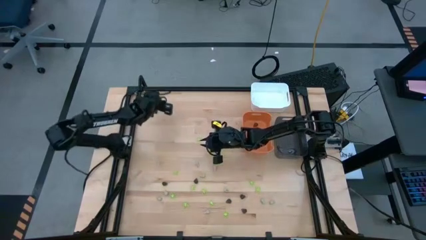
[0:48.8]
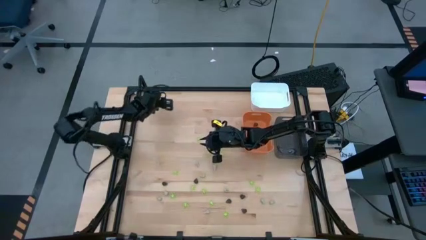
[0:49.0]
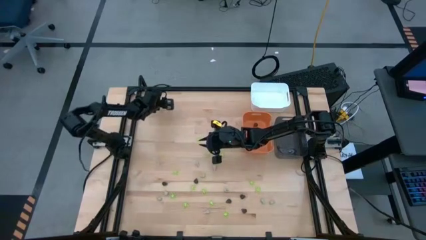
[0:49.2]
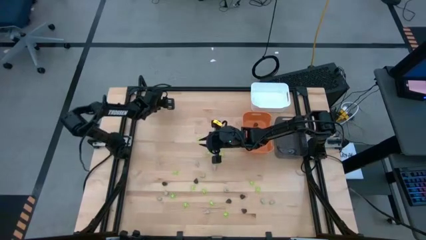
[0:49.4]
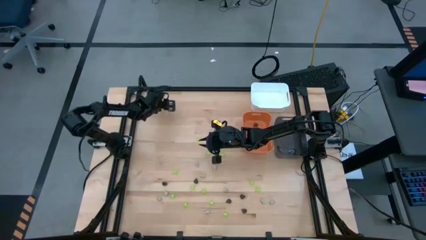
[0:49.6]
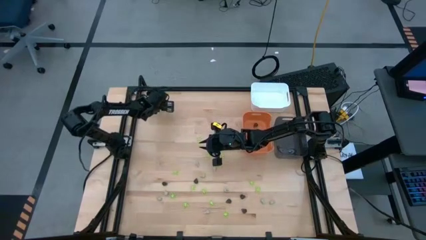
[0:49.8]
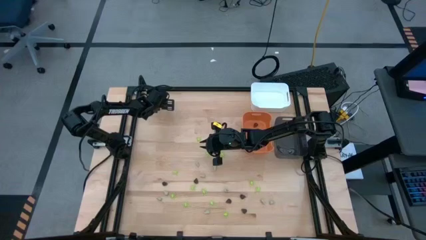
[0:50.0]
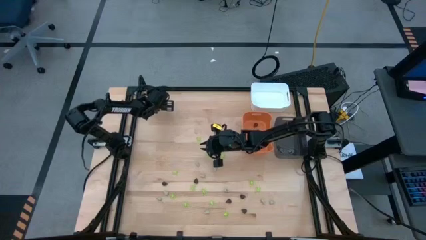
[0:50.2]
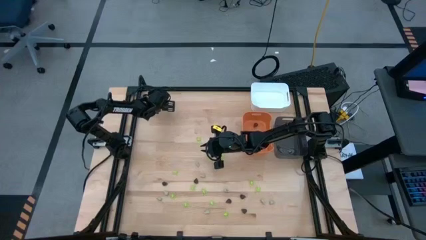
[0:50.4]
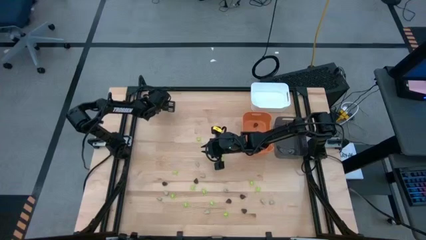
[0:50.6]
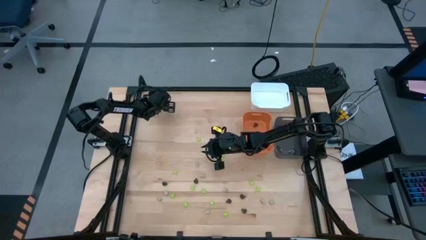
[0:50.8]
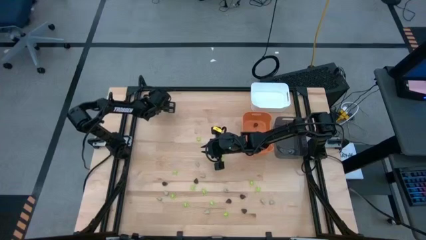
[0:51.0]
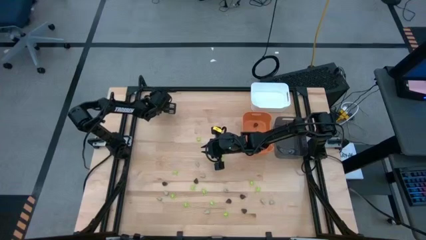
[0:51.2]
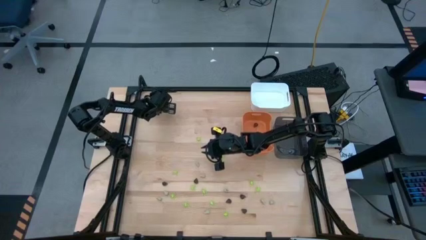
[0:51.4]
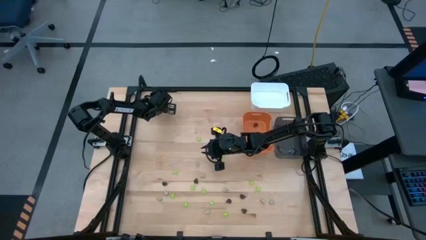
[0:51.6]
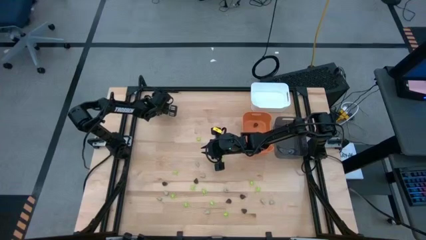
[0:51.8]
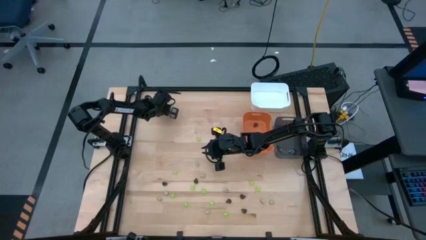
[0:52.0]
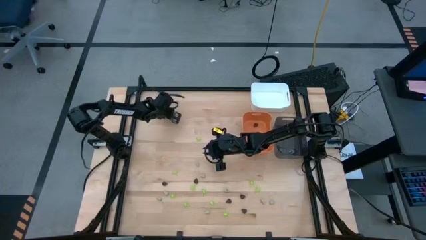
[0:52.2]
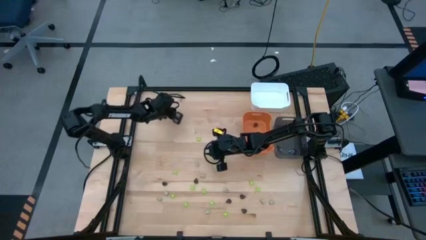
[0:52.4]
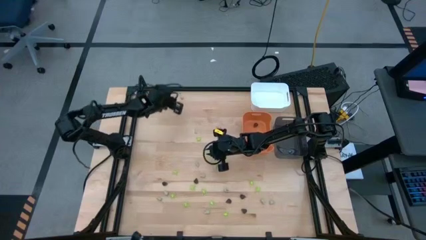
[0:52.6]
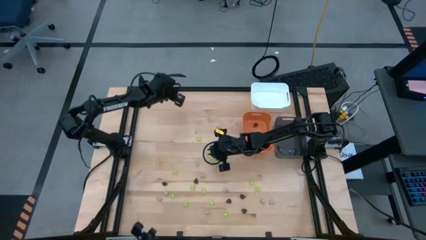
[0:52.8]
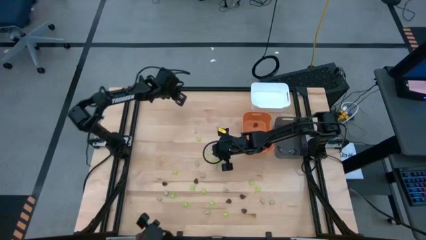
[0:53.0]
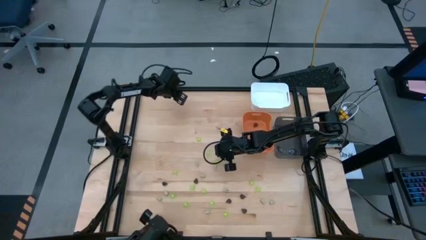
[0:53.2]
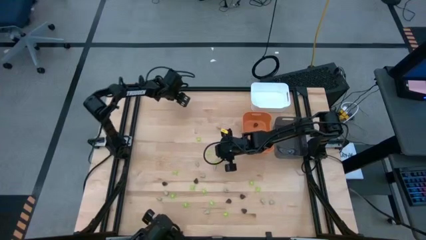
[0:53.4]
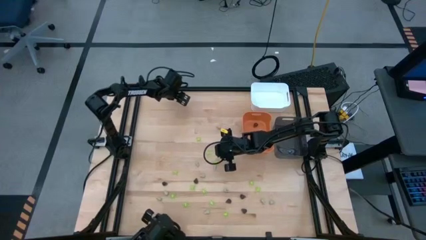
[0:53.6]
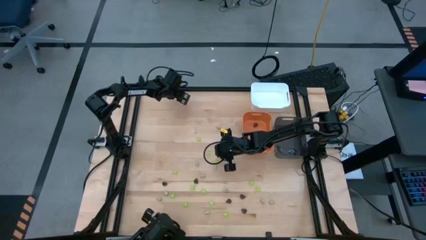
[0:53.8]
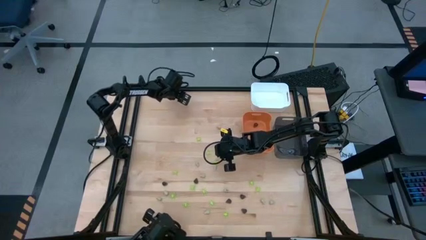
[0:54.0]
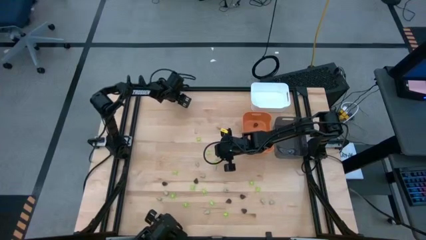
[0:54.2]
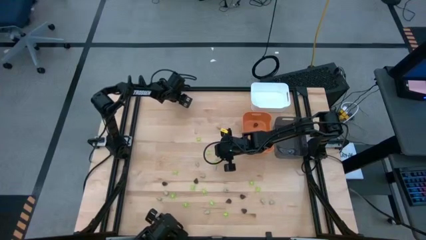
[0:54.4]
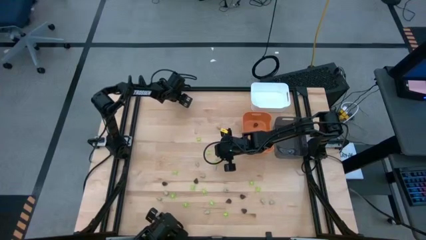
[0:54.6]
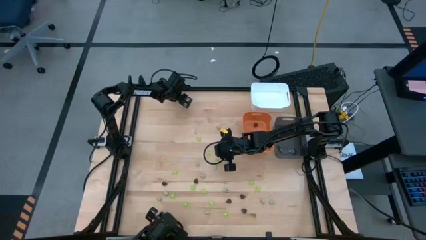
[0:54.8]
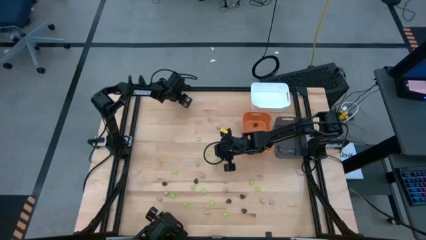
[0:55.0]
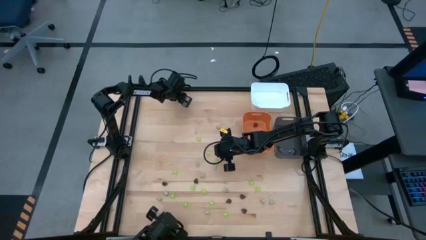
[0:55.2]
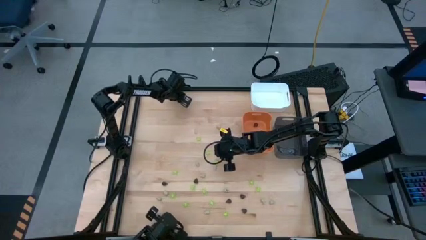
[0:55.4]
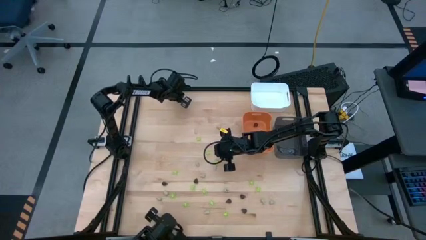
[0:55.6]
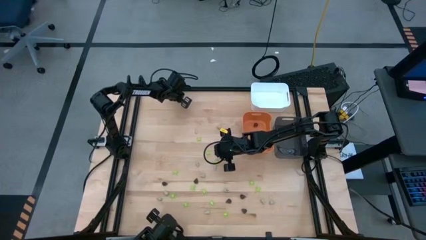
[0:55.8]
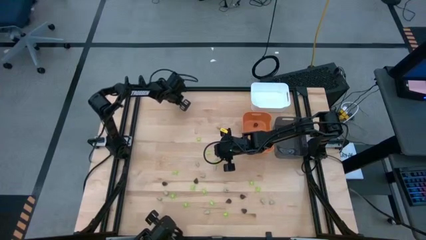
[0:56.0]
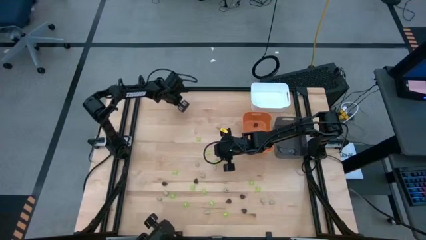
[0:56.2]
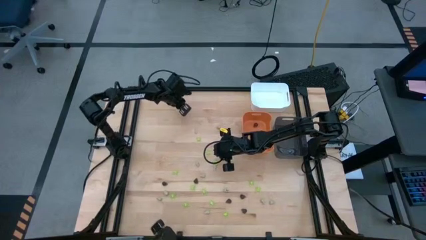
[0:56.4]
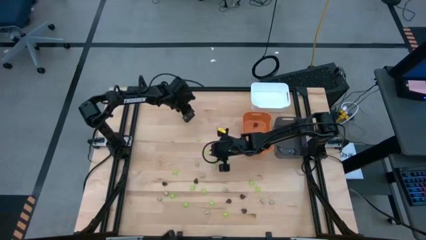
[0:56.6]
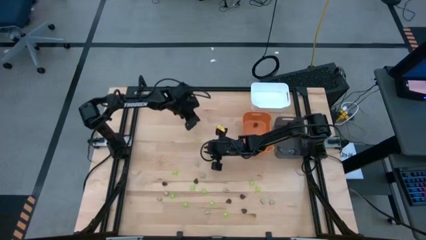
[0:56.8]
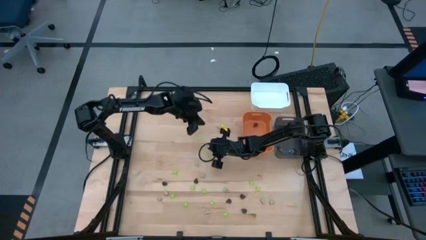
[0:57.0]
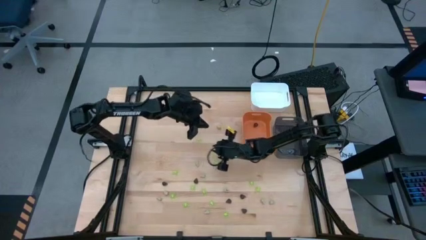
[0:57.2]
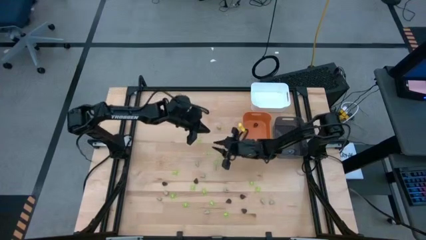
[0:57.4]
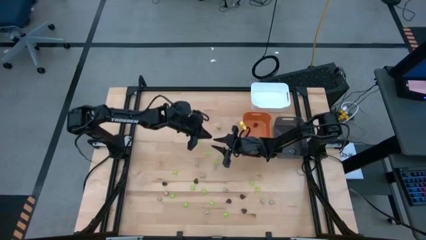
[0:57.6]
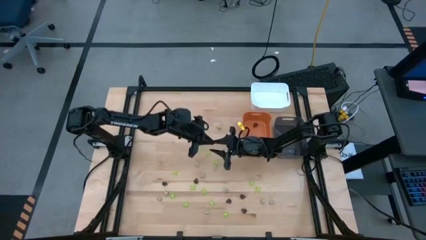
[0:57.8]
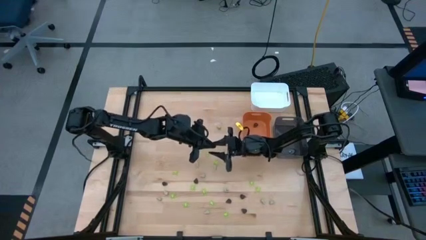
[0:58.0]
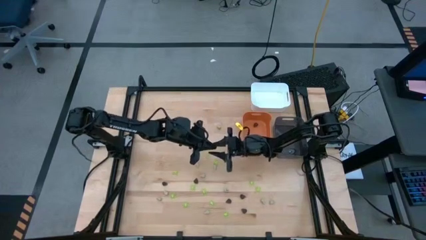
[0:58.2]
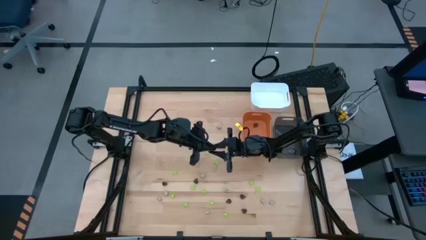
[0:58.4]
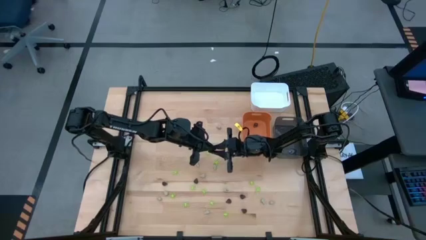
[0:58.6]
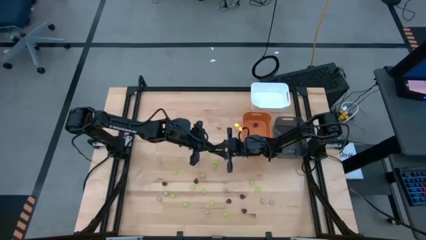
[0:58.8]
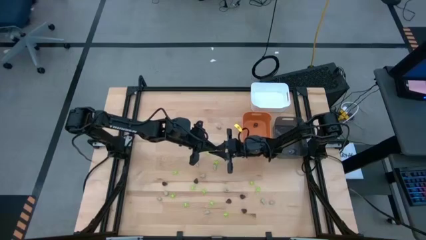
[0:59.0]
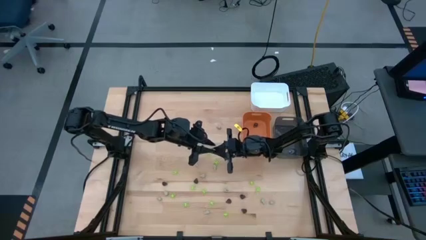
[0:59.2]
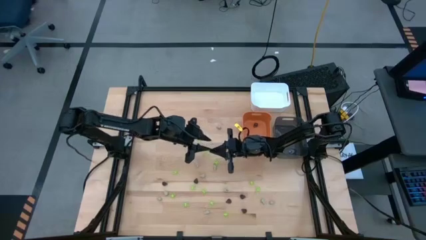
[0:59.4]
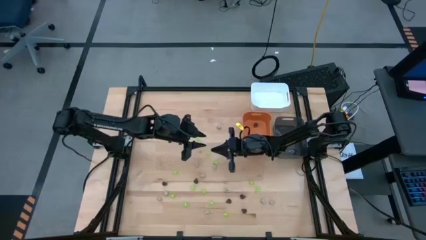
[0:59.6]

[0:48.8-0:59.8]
Task: Sort Halloween decoration
Put the white skull toy into the black bin

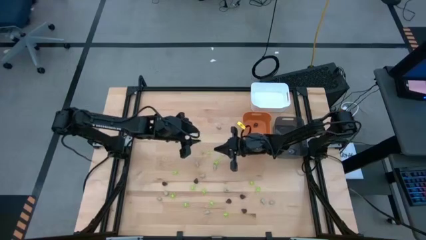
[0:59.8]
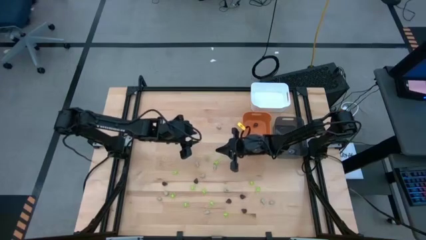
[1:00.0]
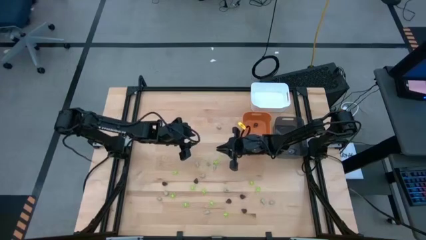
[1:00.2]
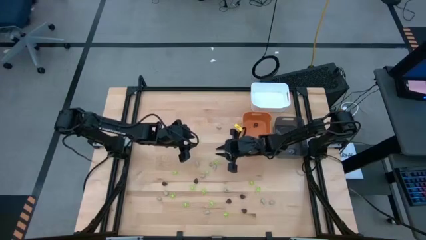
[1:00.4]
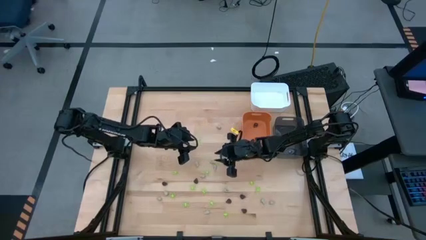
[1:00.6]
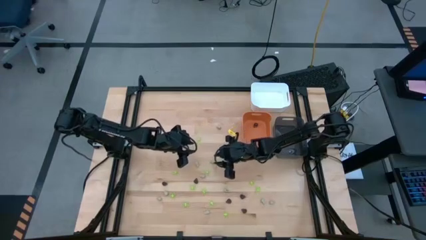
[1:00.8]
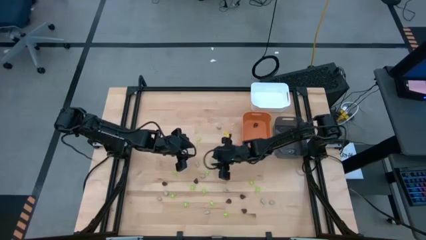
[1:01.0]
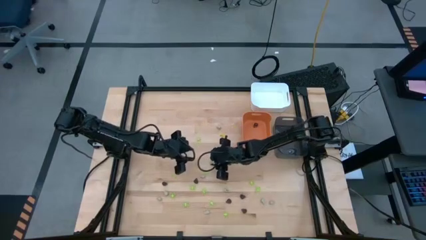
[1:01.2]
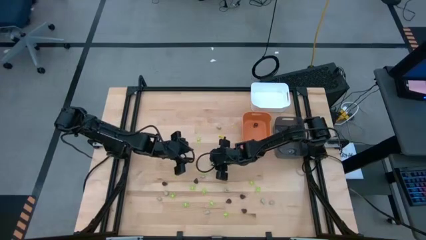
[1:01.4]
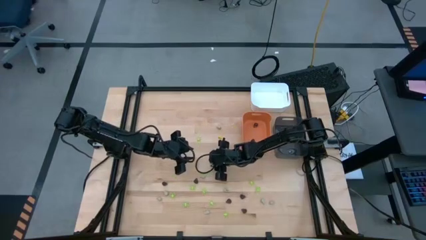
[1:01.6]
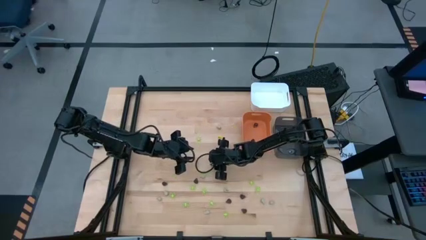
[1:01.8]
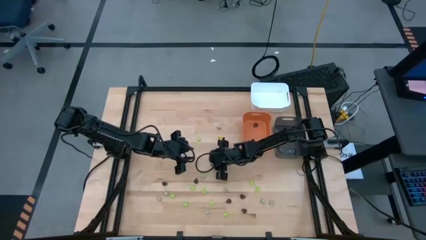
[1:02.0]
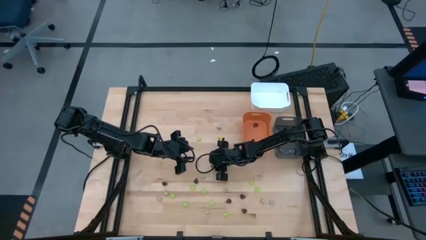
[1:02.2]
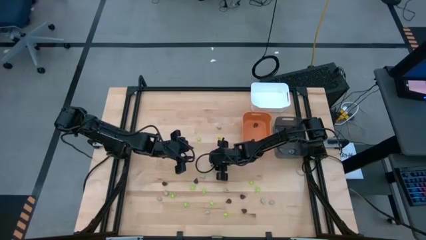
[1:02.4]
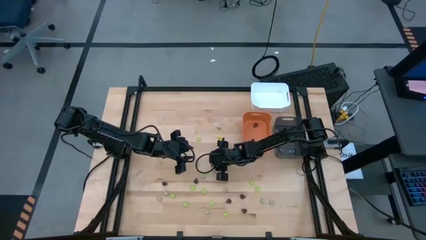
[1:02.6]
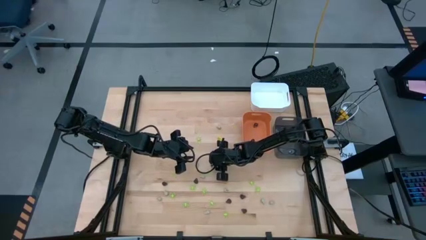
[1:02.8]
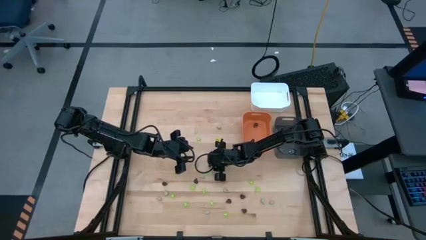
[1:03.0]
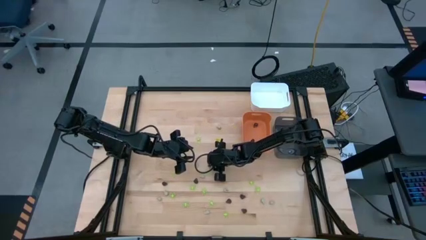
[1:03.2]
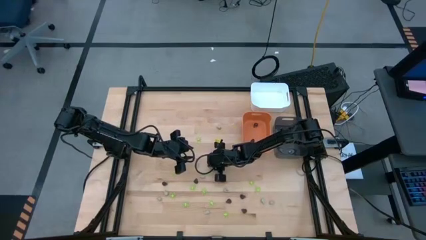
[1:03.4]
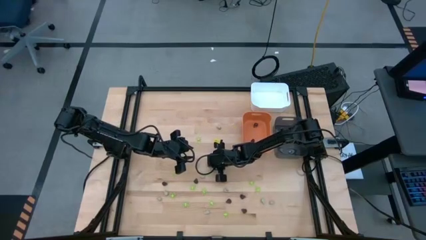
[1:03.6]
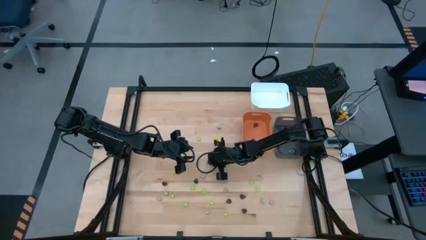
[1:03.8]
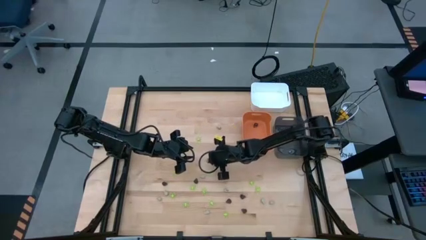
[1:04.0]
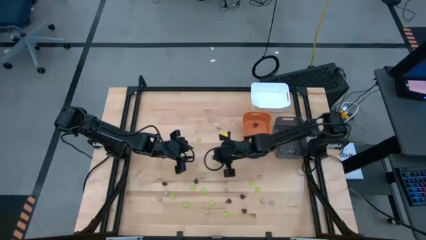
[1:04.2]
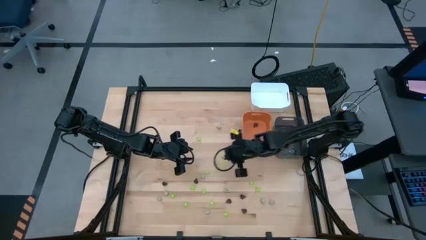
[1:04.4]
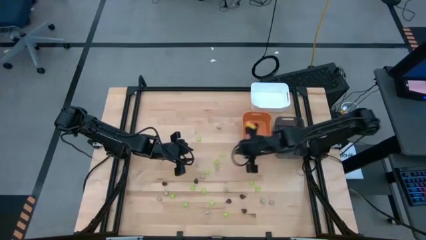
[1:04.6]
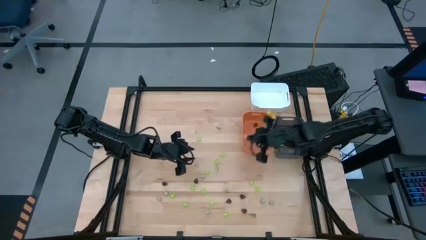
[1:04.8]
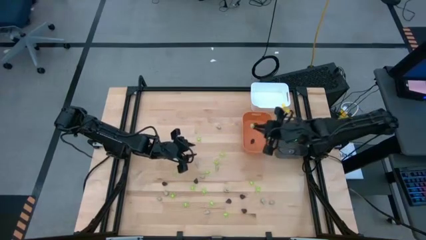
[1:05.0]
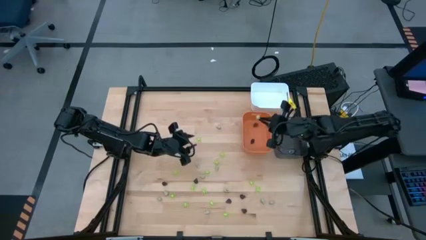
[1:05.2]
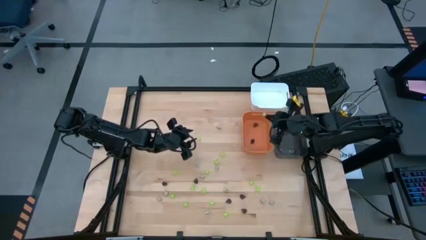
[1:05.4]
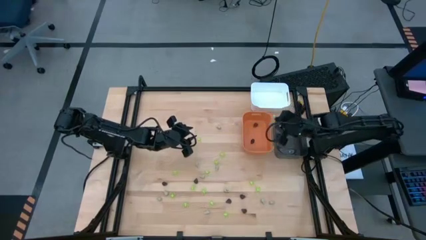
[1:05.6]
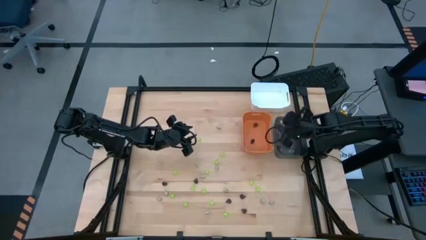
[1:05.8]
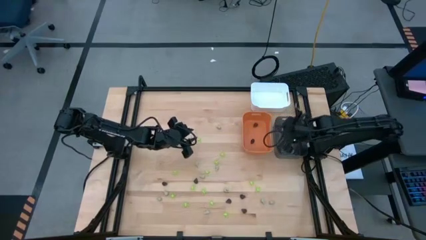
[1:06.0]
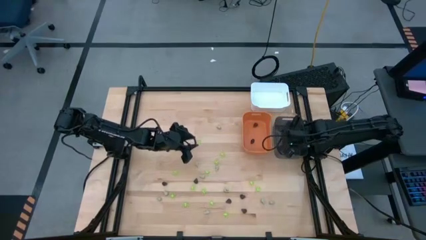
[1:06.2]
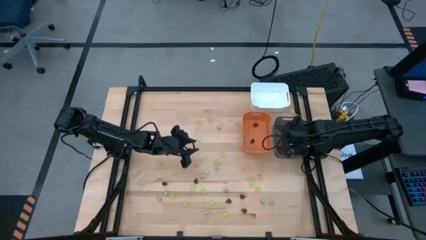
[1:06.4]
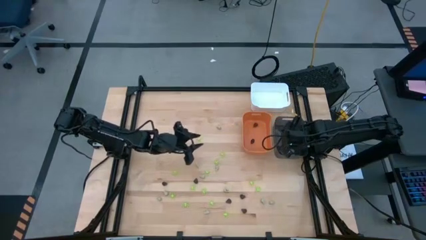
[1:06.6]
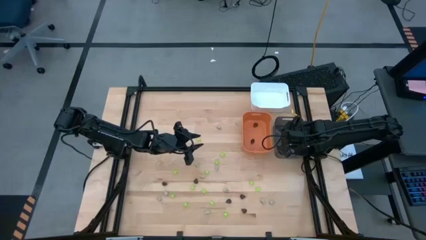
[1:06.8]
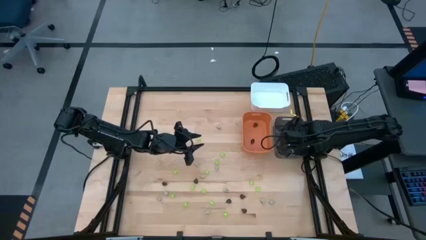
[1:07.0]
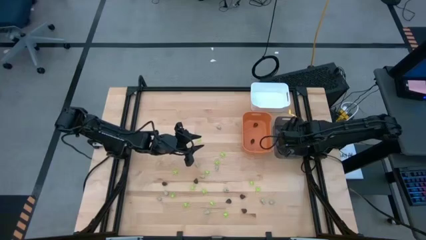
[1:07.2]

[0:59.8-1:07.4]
Put the white skull toy into the black bin
